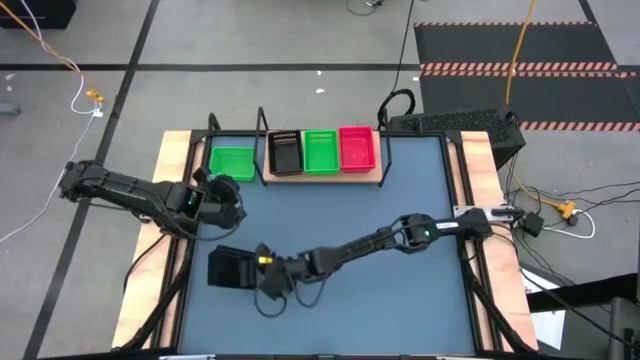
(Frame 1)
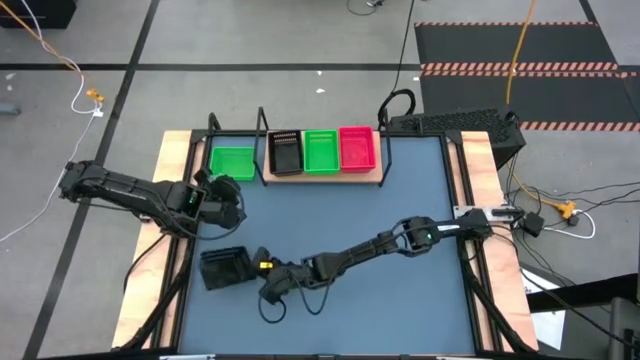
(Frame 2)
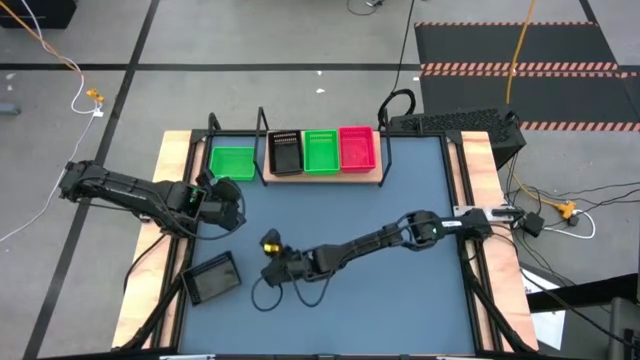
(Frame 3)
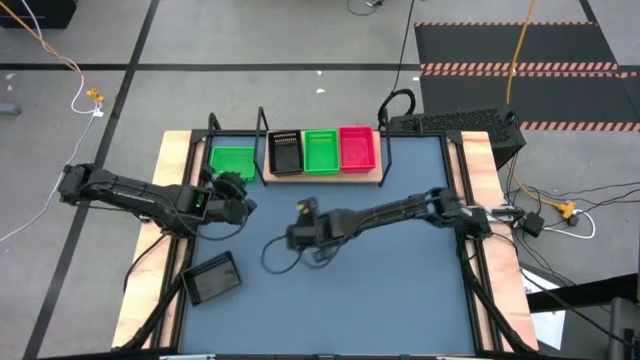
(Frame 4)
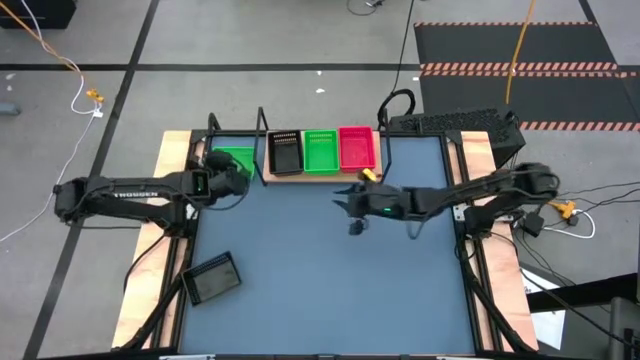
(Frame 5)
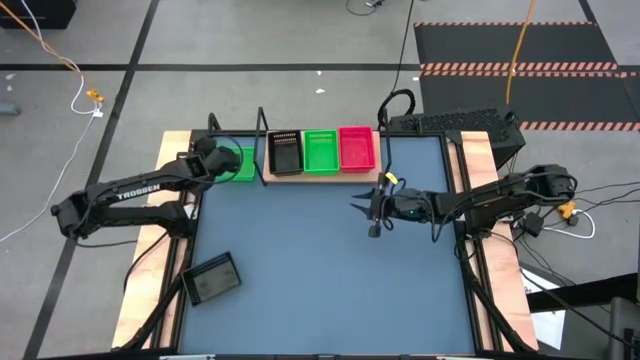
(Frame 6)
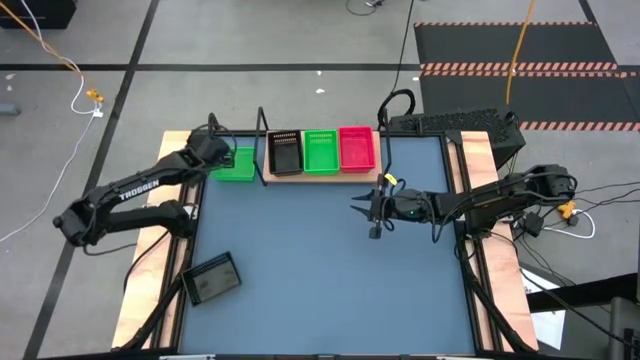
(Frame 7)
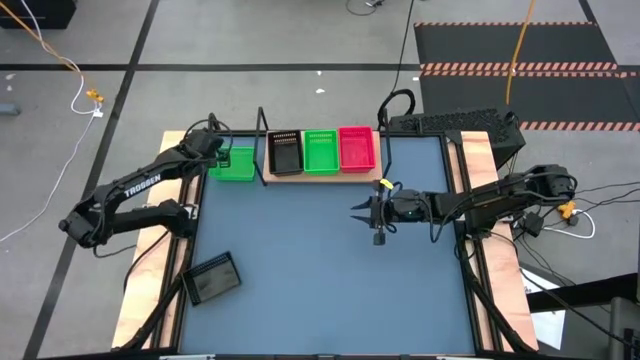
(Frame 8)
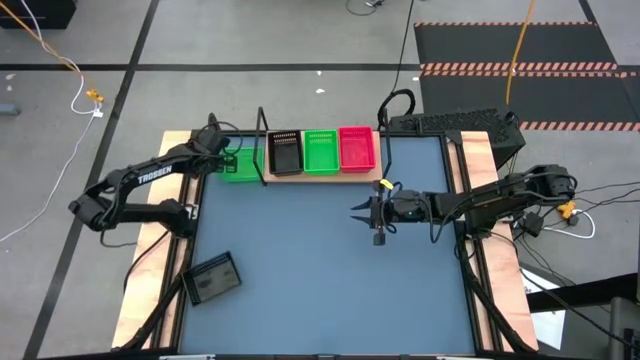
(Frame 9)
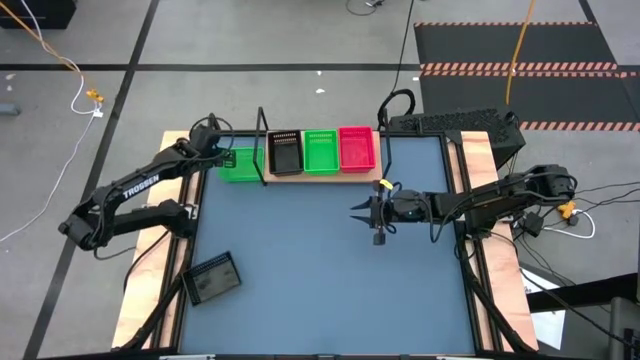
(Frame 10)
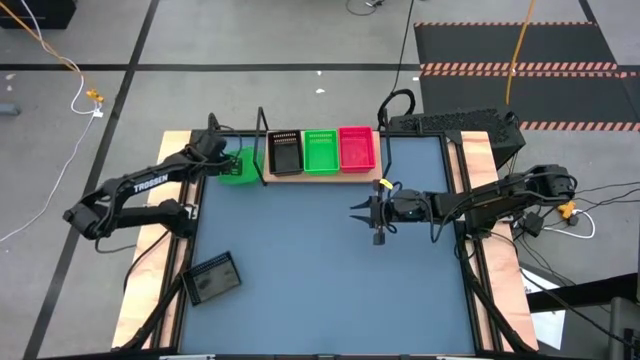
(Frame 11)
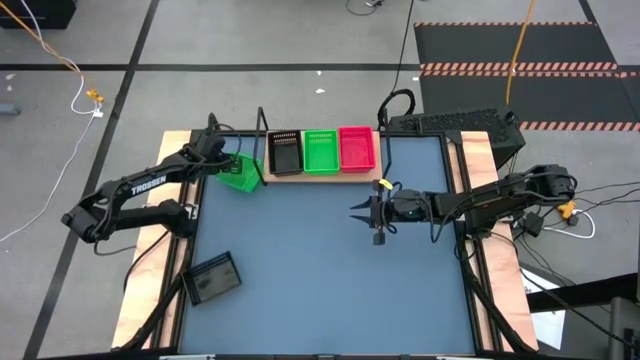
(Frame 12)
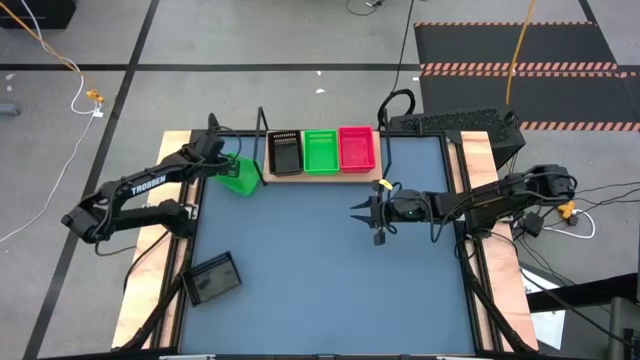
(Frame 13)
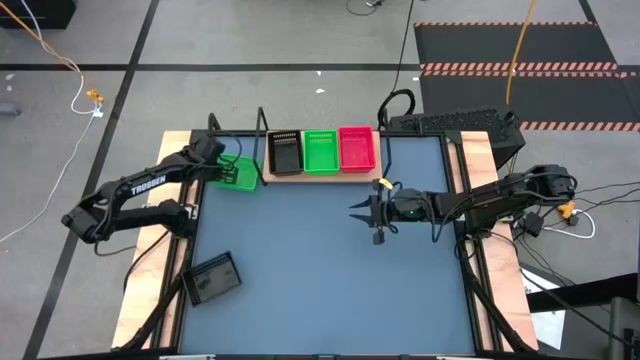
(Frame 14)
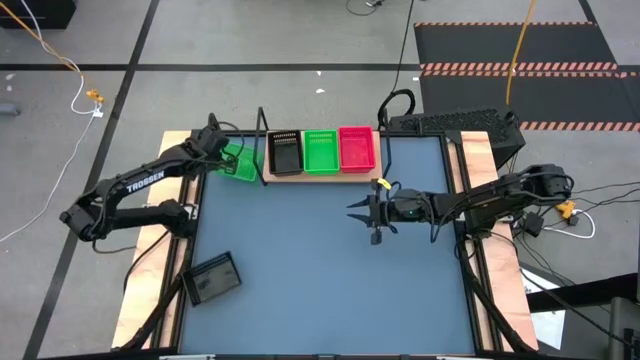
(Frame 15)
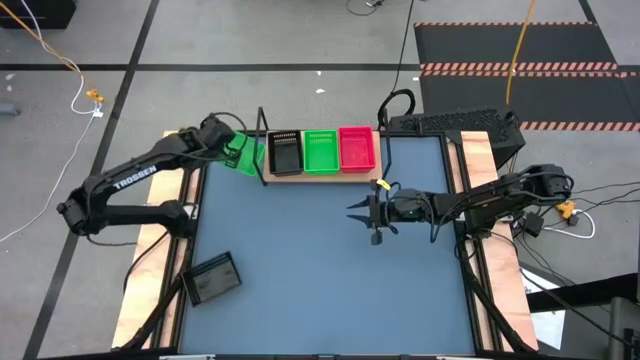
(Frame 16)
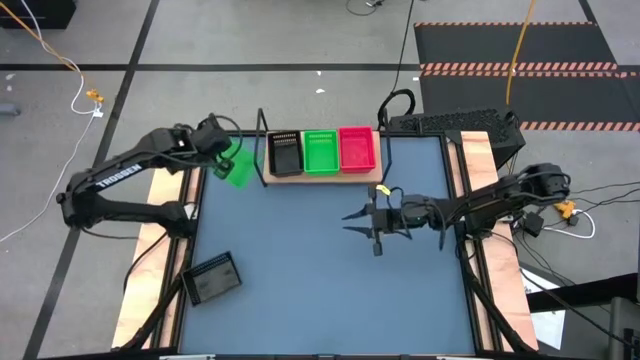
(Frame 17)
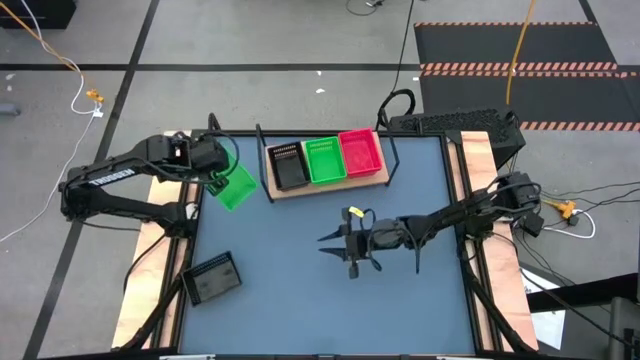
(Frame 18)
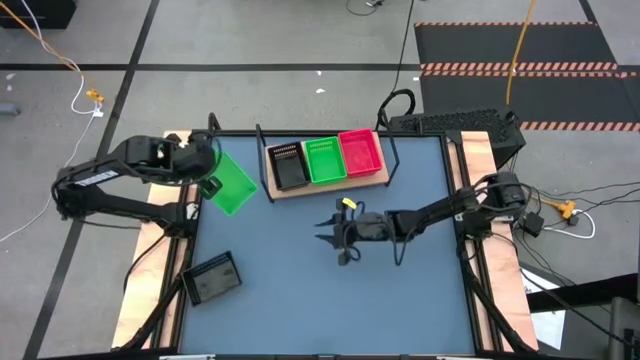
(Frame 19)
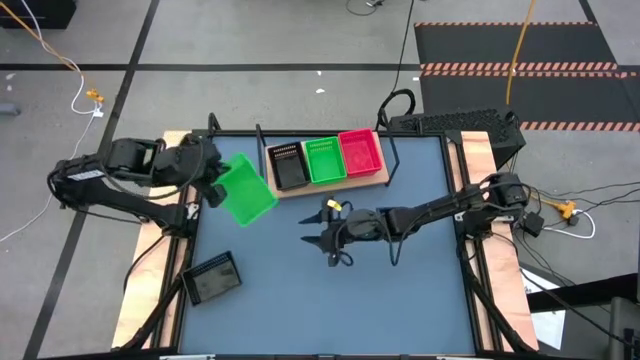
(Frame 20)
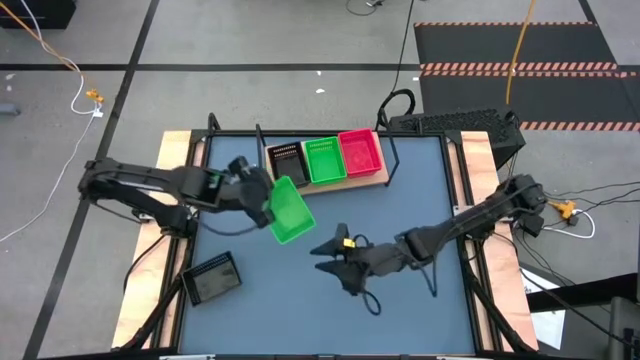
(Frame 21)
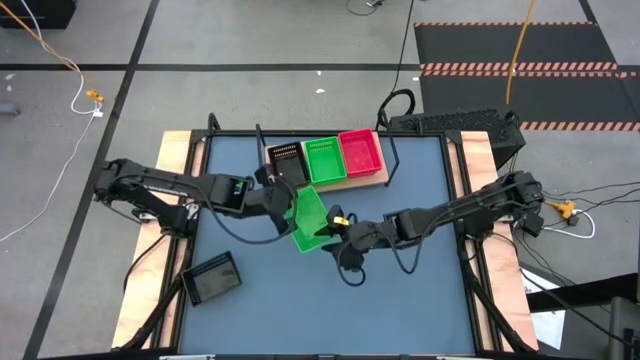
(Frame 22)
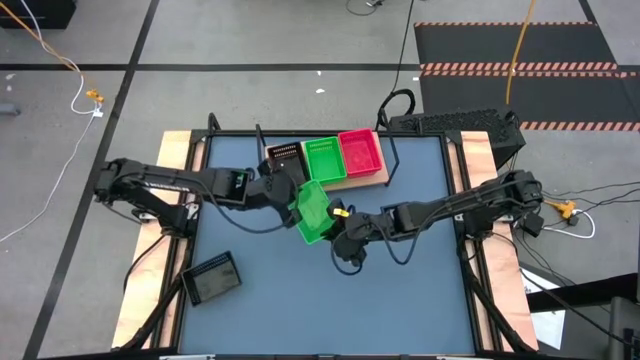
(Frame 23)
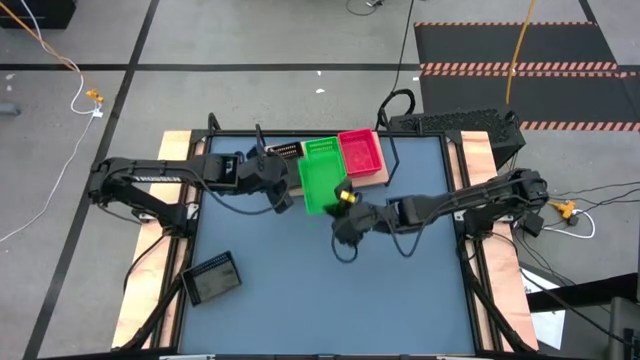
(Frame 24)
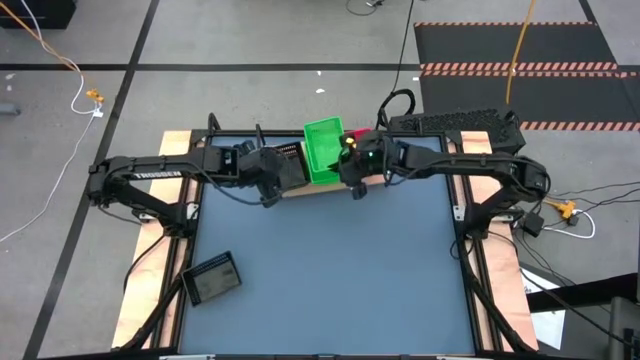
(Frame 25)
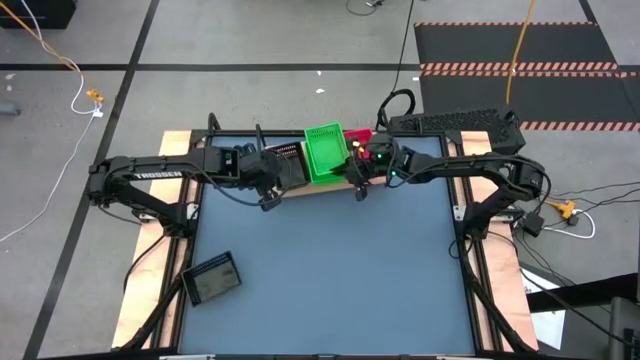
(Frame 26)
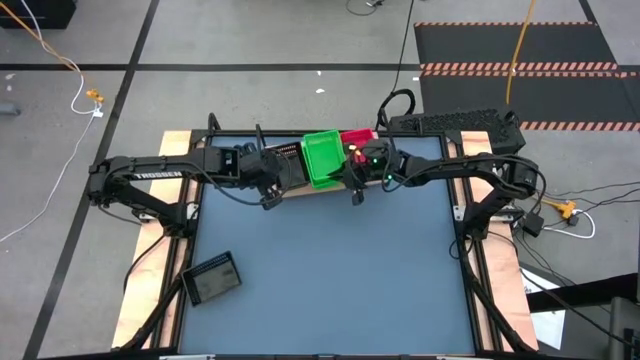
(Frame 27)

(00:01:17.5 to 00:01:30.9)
Task: Stack baskets on shelf by color
Stack the green bin on top of the green bin on the shelf

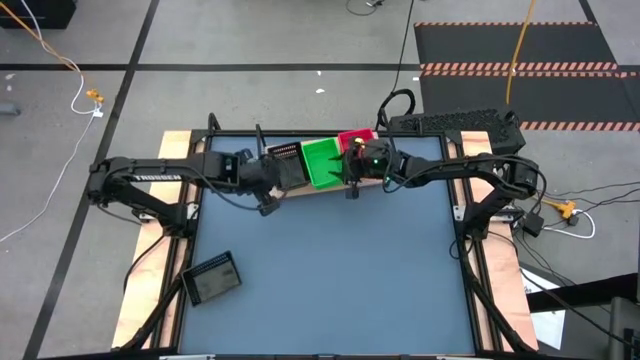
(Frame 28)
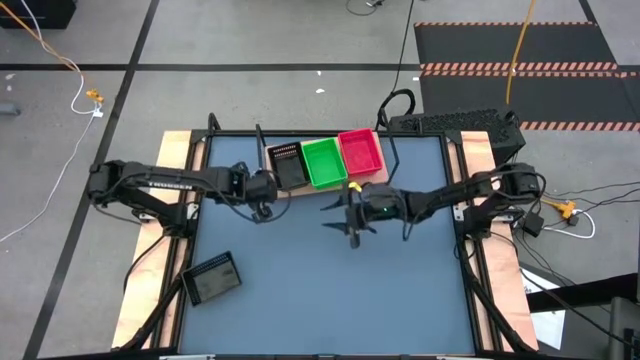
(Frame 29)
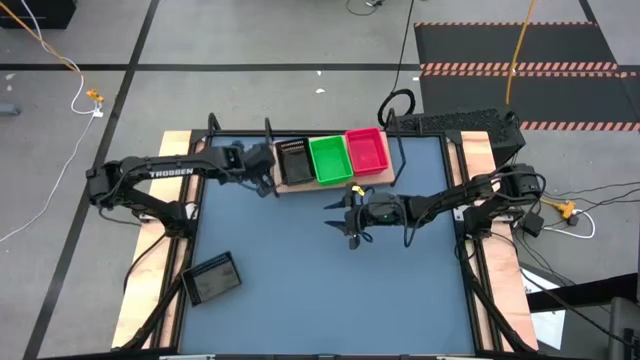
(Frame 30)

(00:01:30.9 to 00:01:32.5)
Adjust the shelf

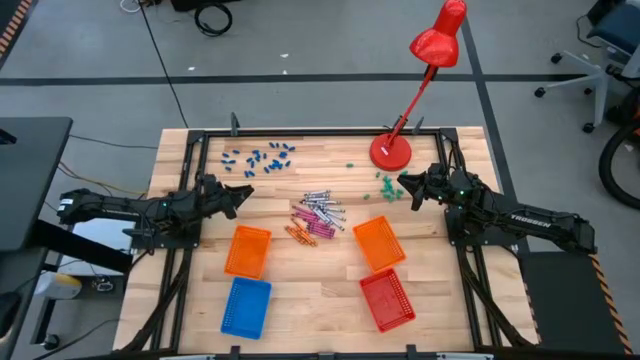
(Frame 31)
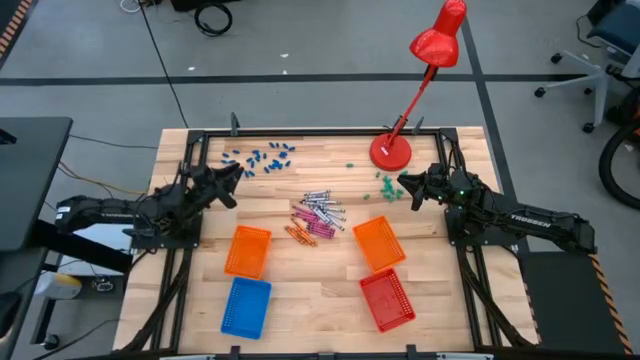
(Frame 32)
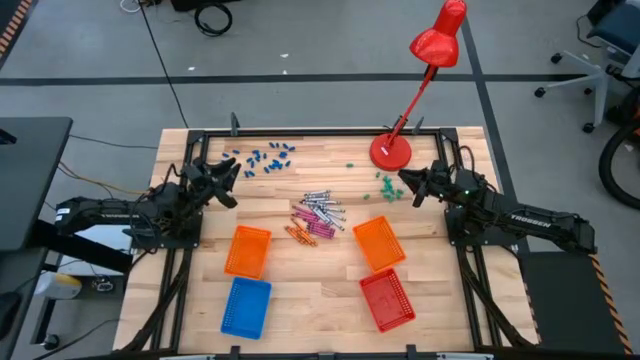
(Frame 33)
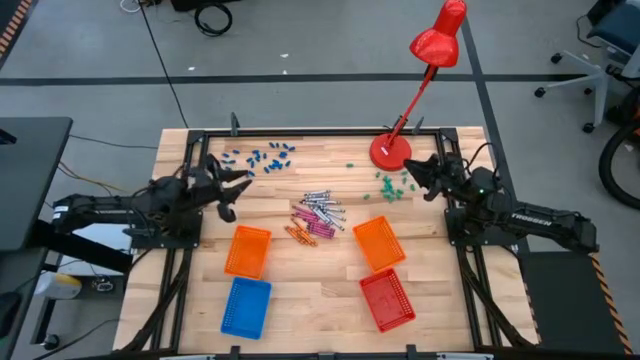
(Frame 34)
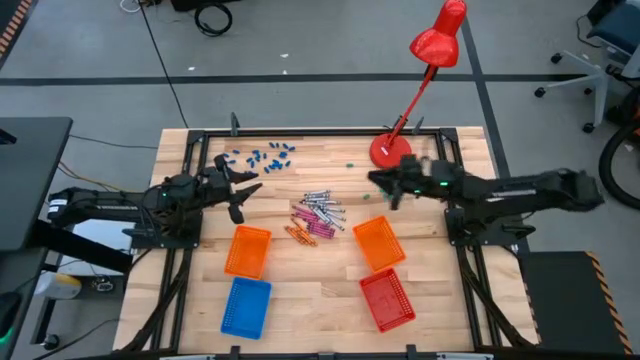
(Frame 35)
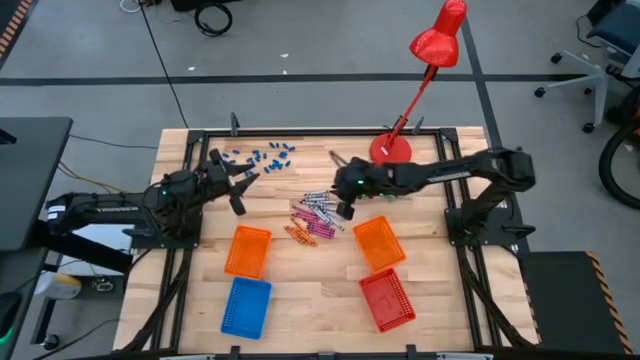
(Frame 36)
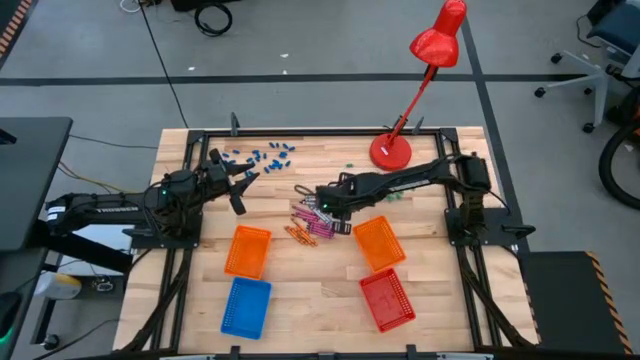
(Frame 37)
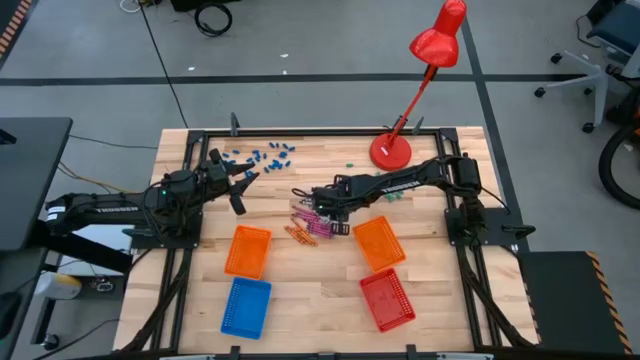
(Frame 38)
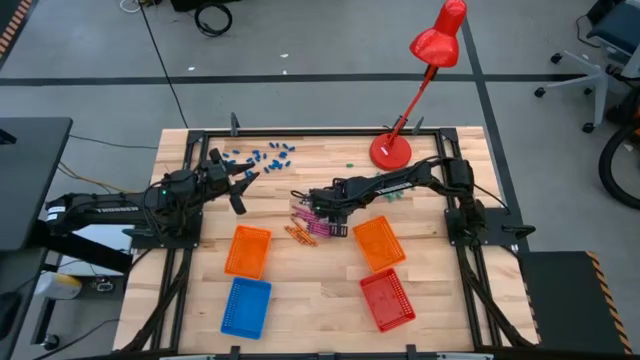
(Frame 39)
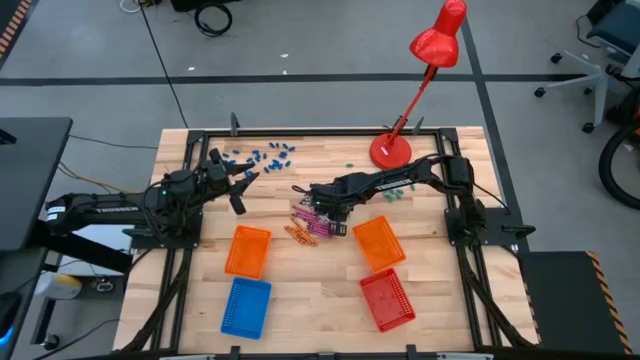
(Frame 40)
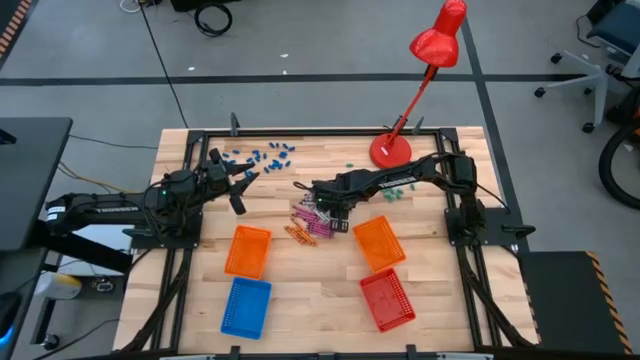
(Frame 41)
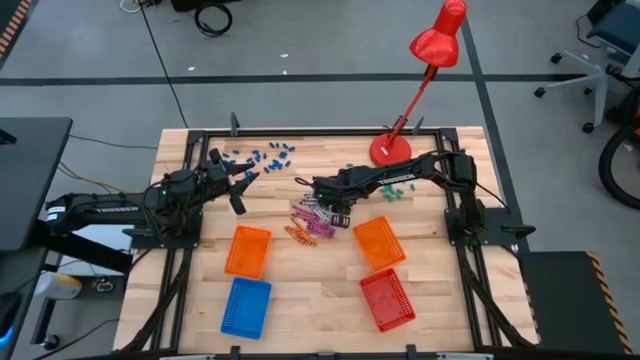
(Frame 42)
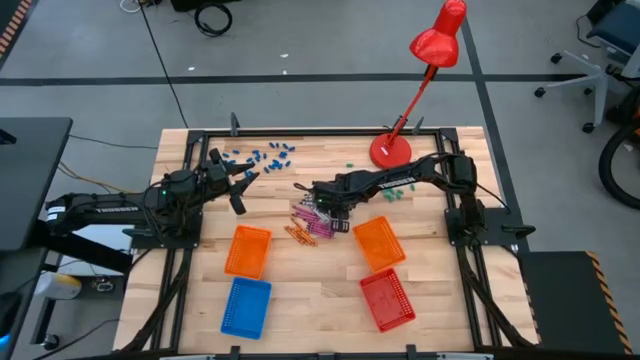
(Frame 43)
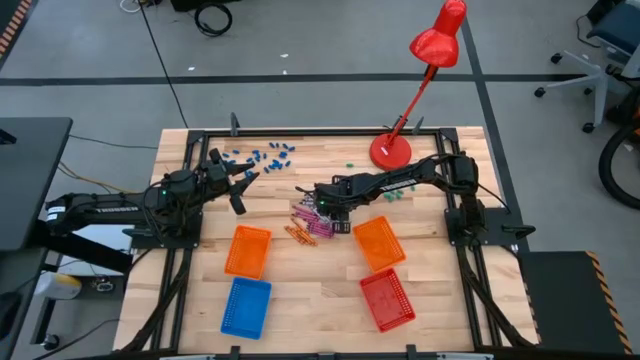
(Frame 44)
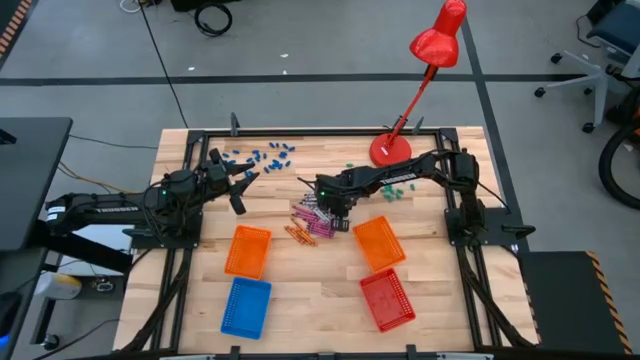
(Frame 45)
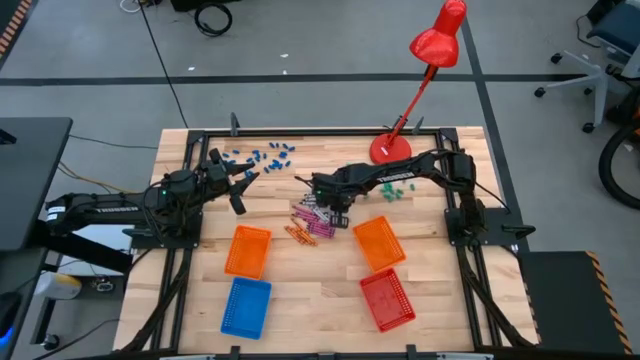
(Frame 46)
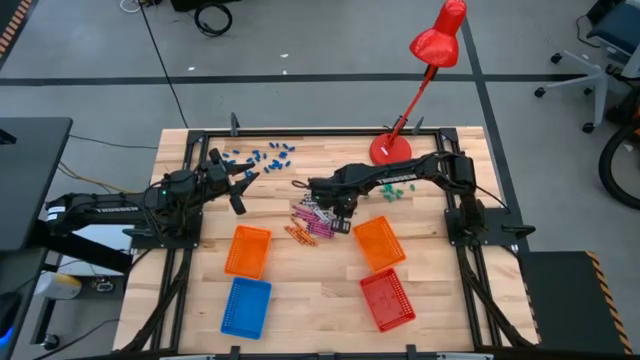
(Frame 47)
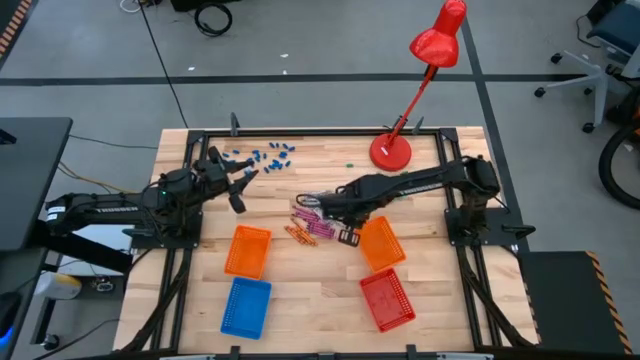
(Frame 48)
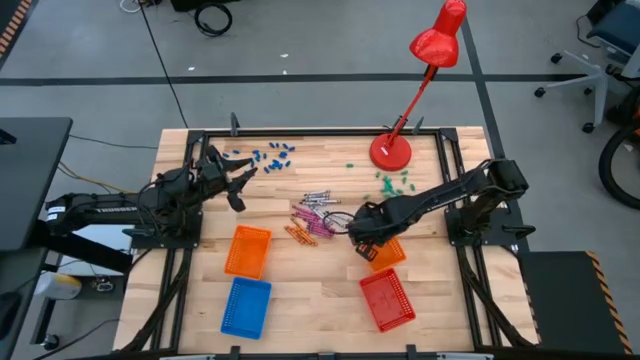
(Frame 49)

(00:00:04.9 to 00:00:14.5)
Task: Sort crayons
Put the black crayon into the right orange bin
